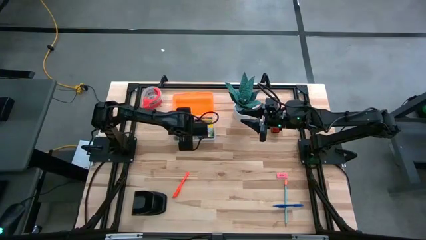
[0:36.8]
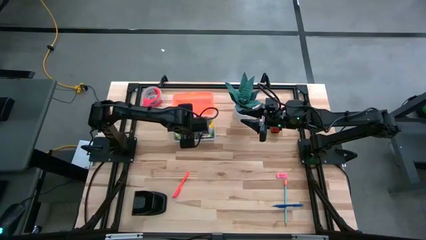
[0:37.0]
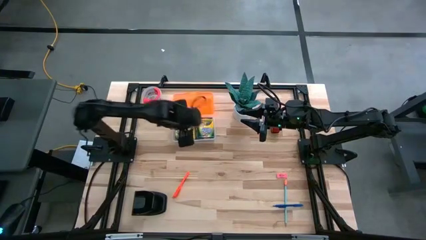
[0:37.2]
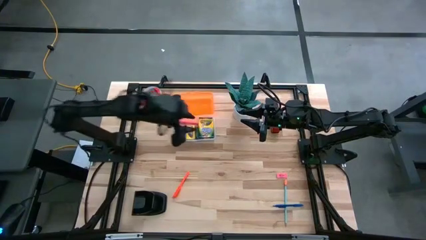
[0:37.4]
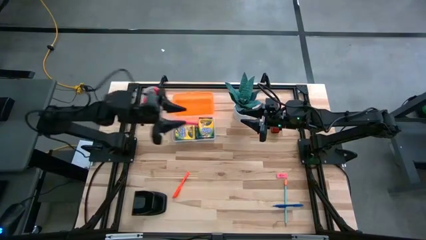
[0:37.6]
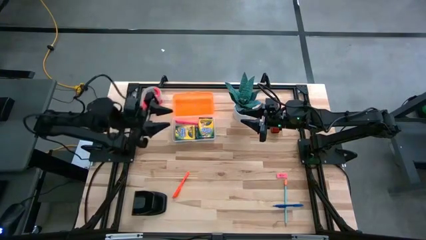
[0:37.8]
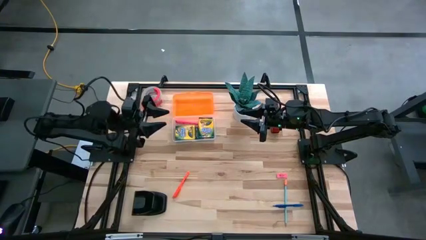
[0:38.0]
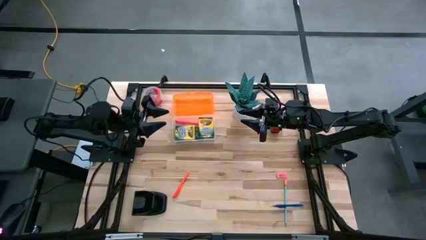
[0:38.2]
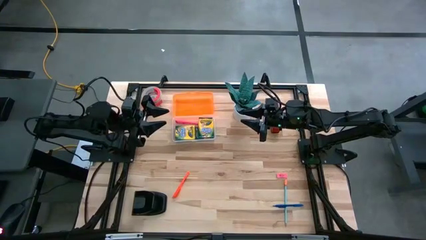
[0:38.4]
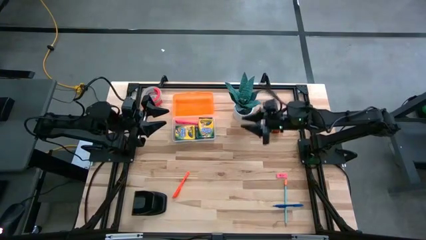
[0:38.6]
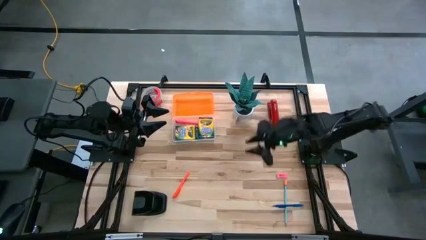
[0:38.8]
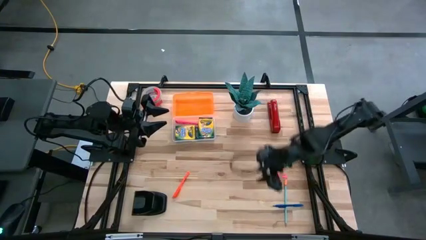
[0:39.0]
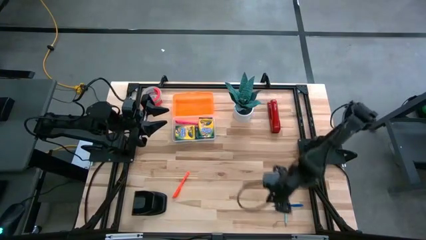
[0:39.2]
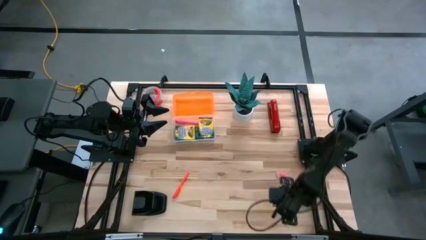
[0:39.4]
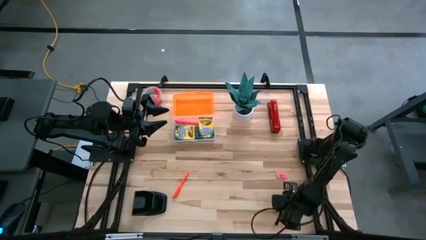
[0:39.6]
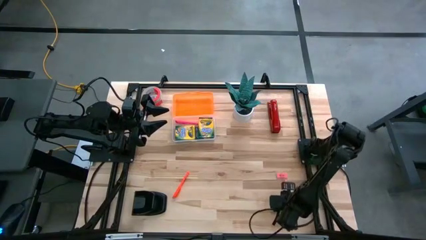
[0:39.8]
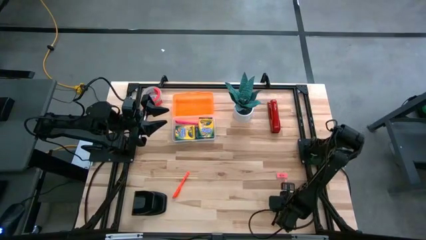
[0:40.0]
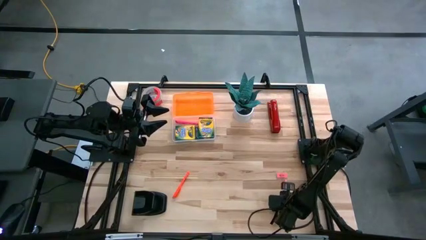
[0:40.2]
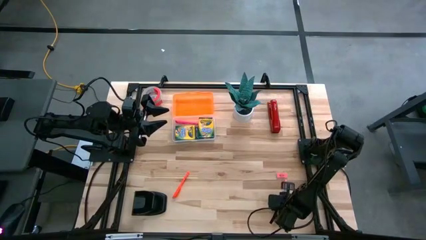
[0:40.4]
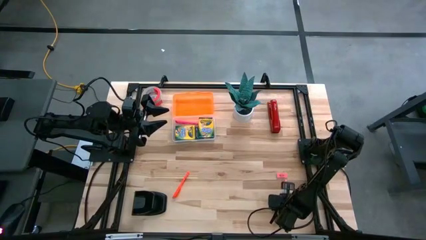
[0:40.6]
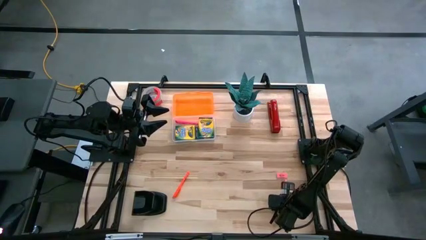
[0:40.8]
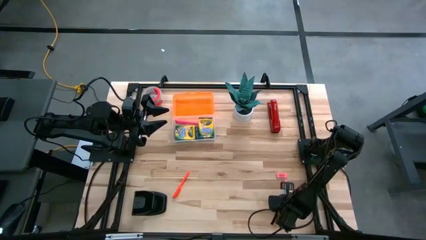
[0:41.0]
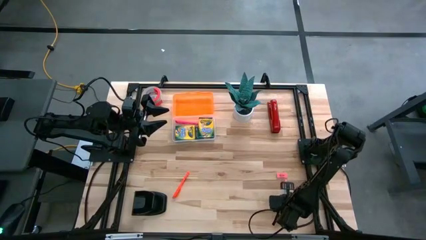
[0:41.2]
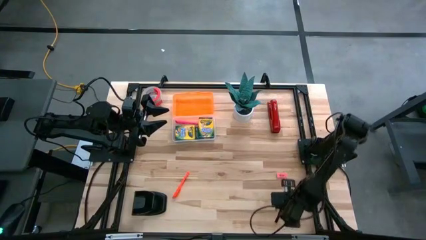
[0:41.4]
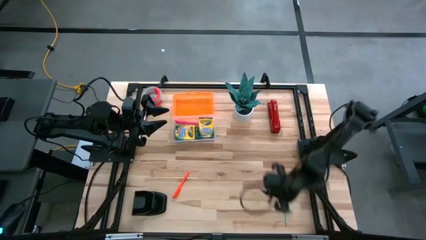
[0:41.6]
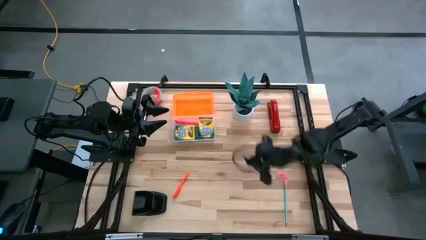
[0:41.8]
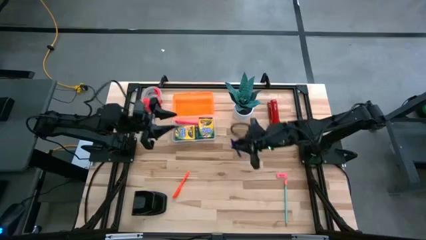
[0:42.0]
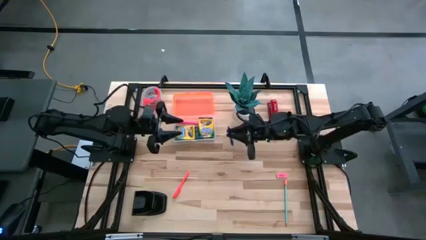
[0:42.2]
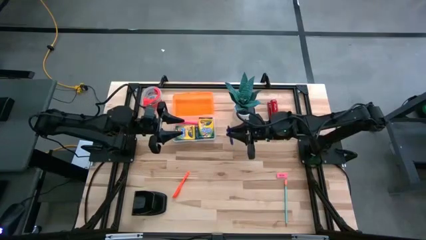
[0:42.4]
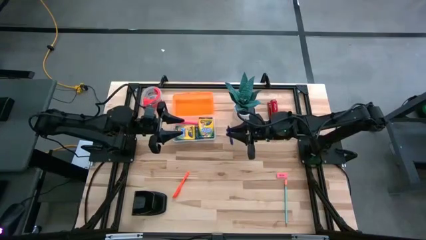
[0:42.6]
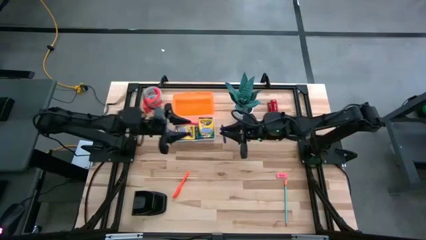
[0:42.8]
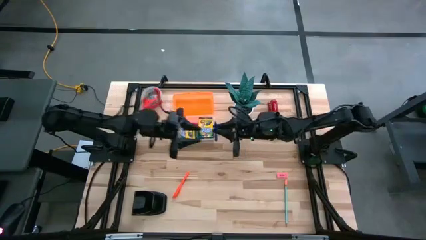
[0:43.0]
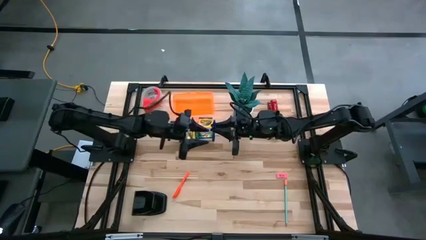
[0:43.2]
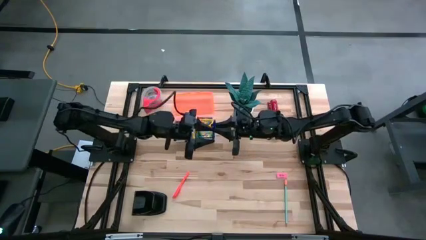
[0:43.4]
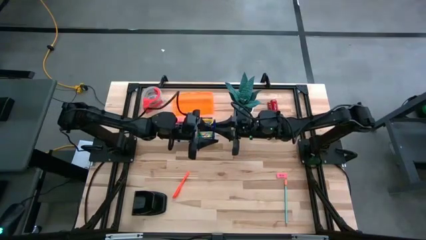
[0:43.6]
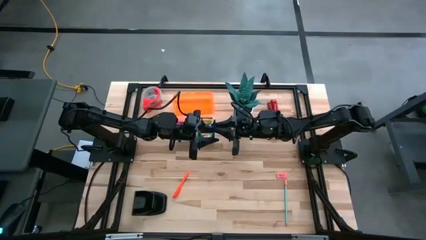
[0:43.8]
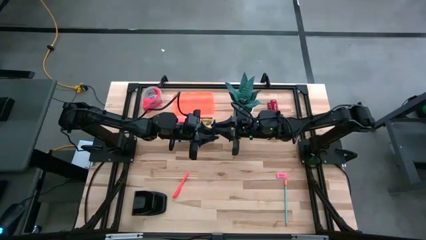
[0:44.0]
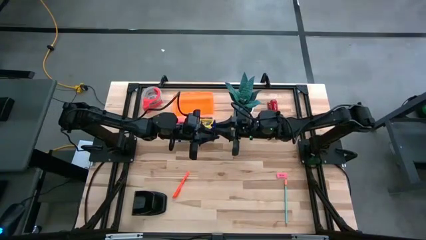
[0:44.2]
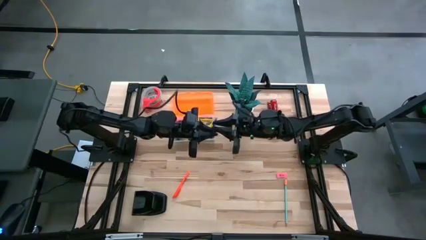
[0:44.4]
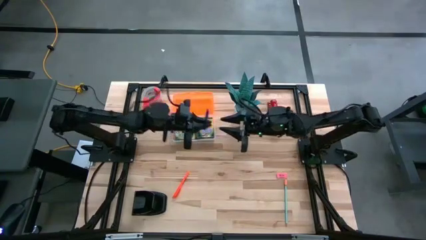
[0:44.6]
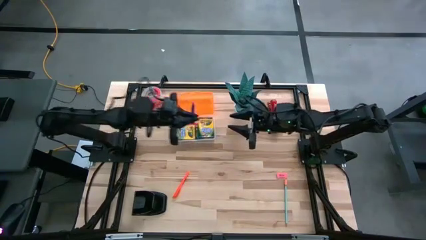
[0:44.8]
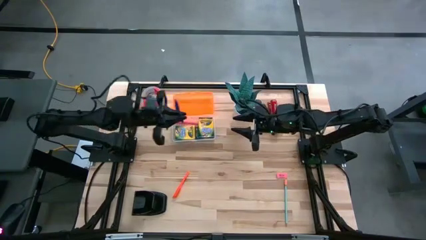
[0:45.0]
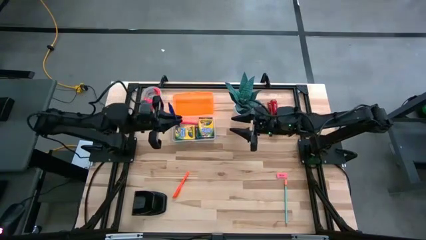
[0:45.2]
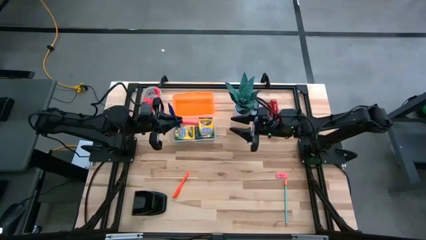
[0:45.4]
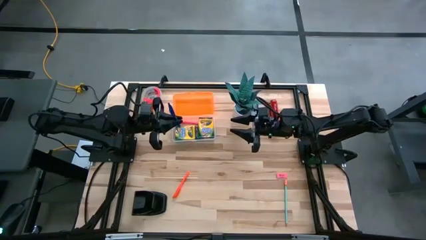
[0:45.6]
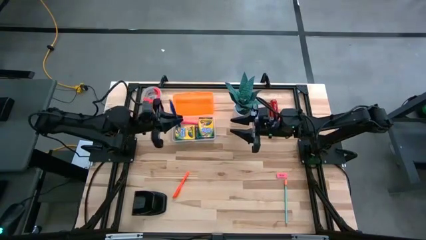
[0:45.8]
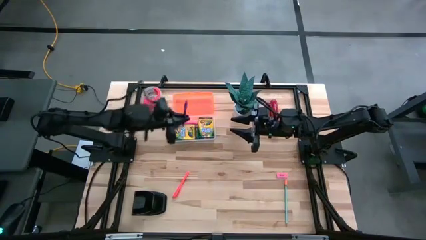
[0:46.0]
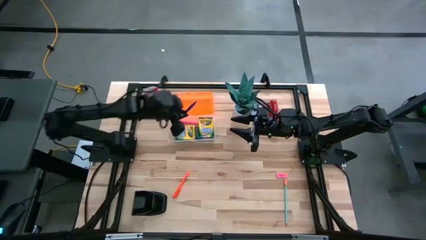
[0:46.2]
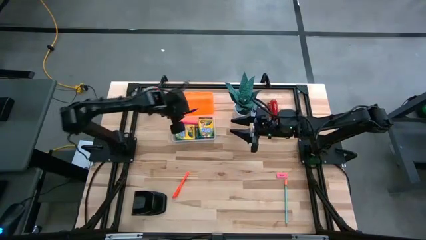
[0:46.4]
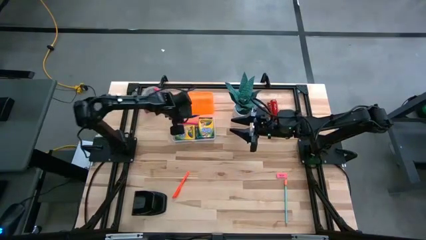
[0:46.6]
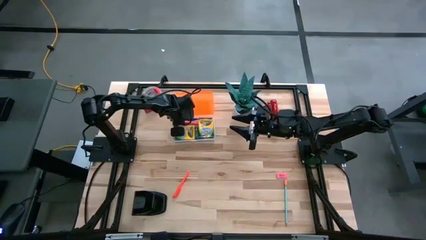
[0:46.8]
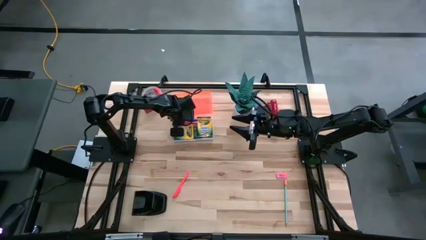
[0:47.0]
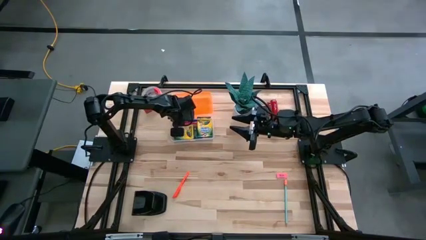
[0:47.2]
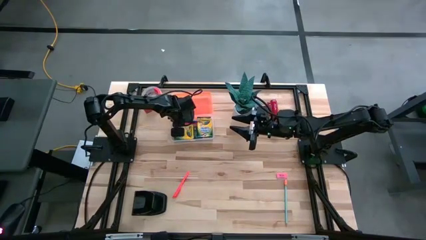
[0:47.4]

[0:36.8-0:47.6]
Task: Pack school essentials
Put the blue pen into the orange supply box

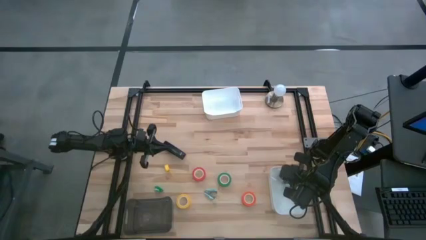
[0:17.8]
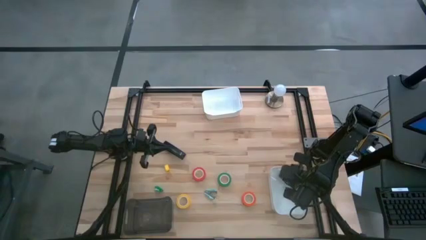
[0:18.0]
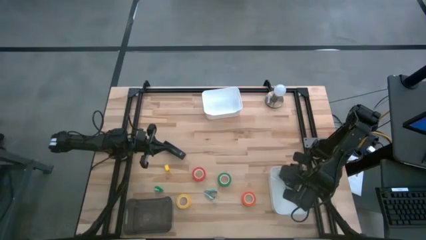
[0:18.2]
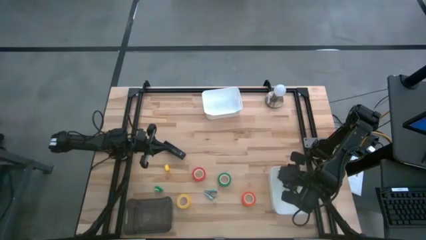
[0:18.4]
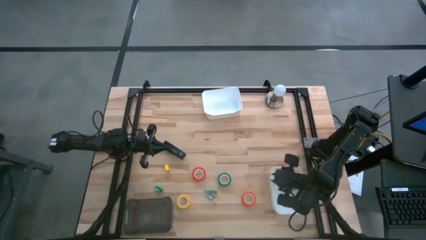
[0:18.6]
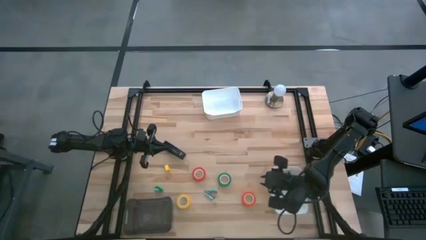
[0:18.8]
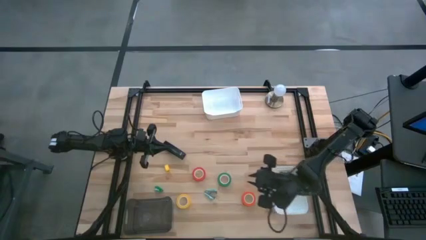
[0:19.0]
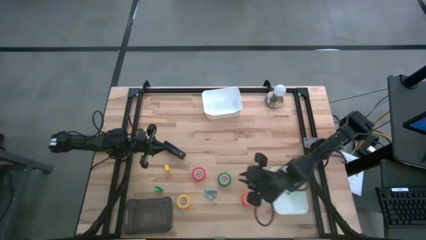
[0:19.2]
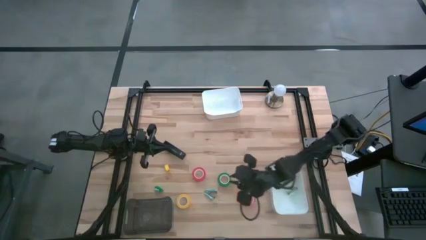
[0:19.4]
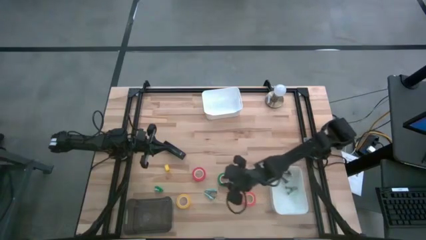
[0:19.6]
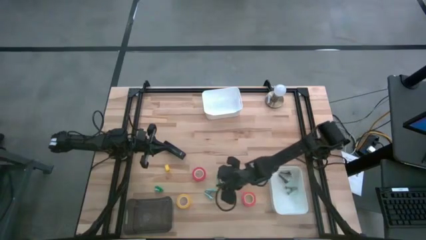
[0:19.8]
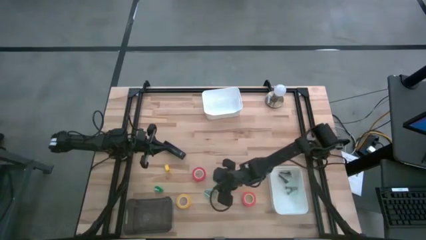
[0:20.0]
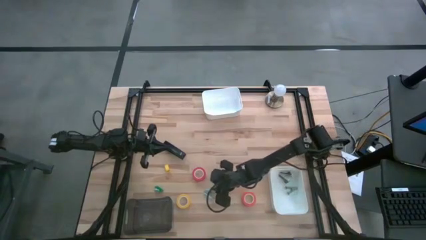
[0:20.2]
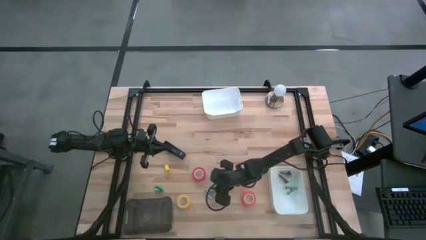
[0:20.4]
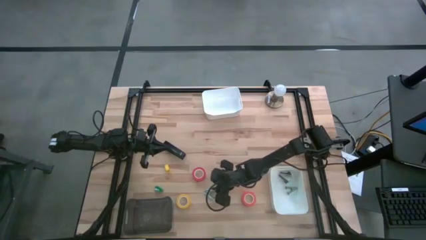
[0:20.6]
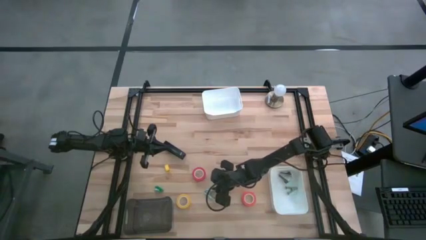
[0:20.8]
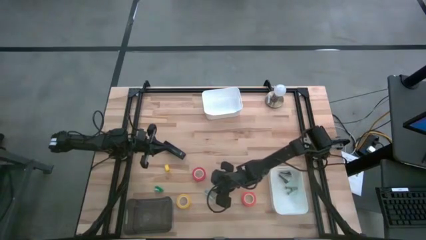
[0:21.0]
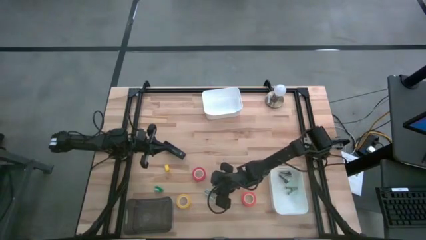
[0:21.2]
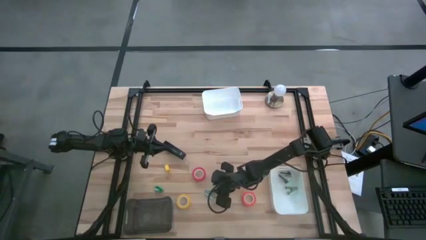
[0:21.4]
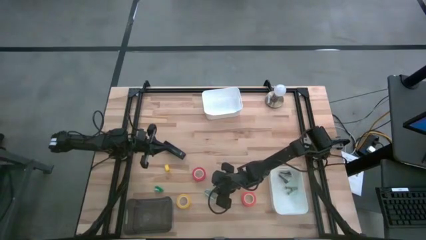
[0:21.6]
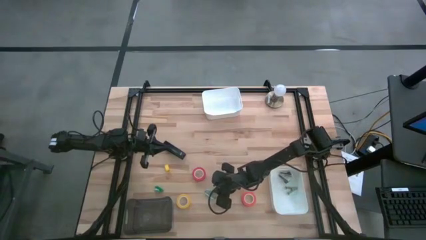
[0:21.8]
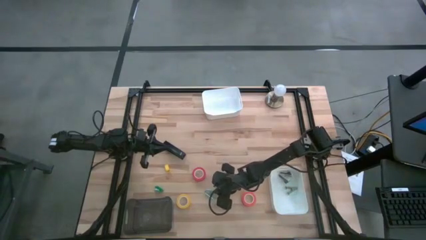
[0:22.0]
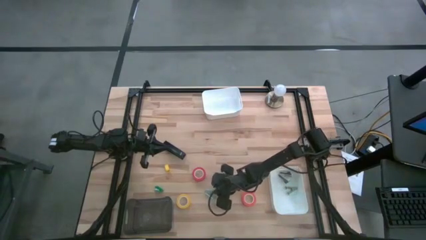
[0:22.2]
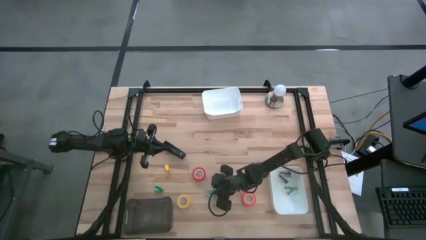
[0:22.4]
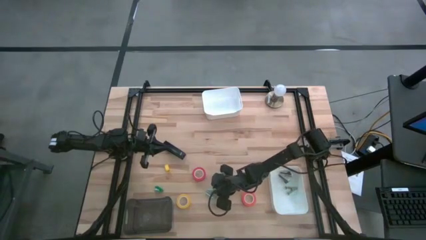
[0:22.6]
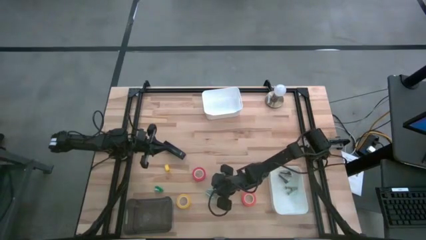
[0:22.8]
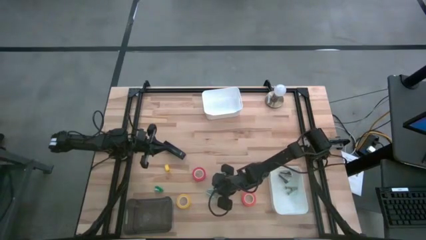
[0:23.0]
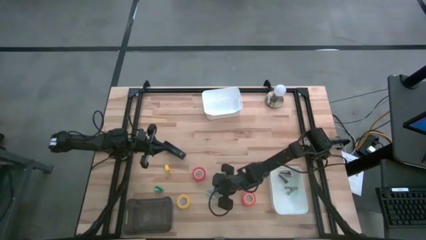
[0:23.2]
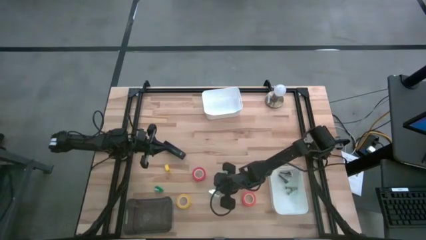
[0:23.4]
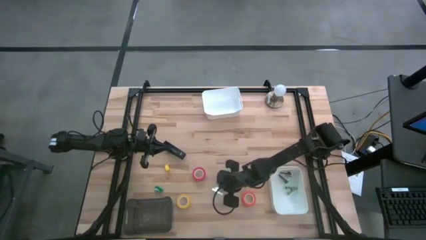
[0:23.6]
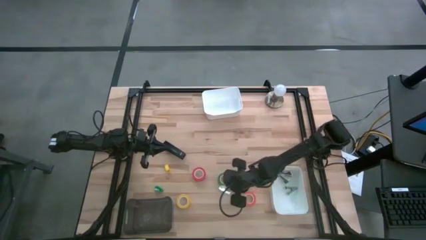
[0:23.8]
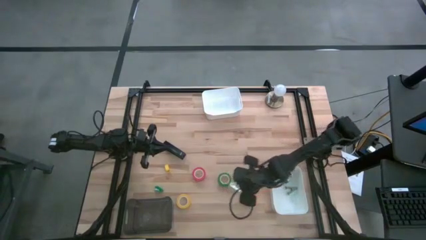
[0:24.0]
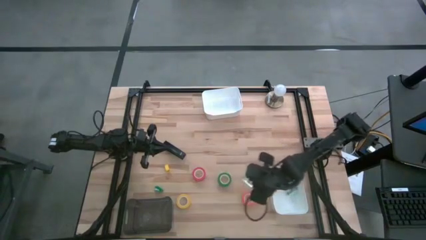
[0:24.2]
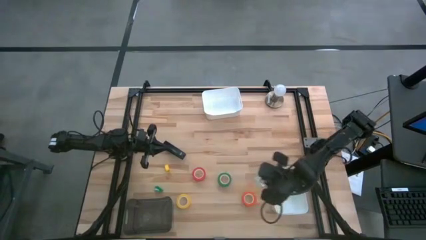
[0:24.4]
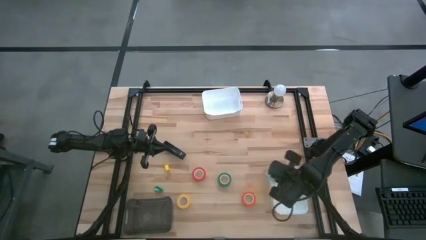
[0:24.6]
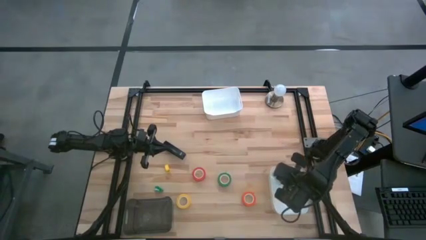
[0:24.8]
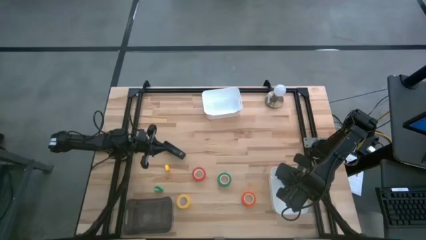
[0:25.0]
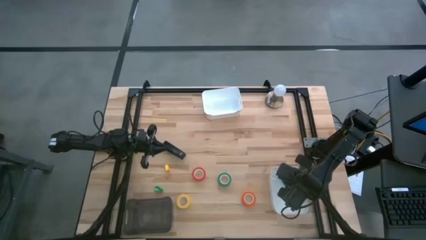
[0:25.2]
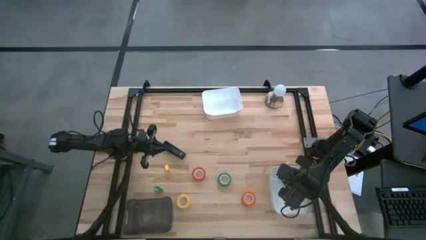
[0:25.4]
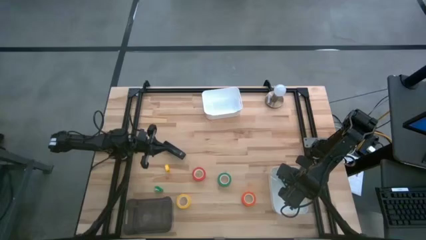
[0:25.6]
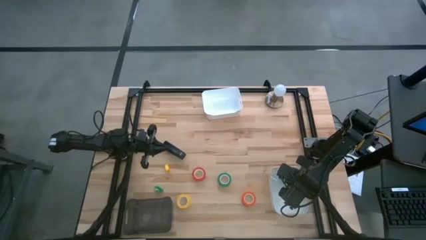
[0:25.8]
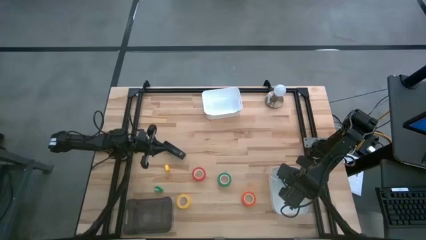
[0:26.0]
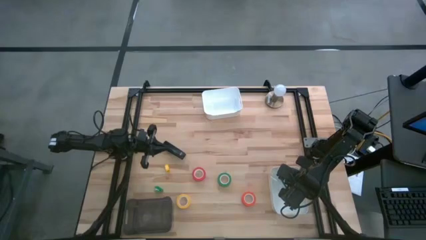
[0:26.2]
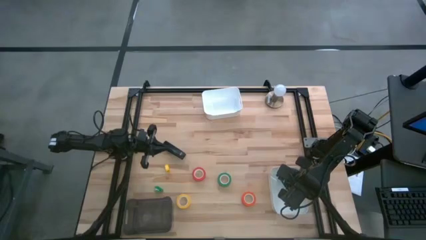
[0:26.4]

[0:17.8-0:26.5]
Task: Pick and place Stapler, Stapler remover, tape
Put the light blue staple remover into the bottom white bin
